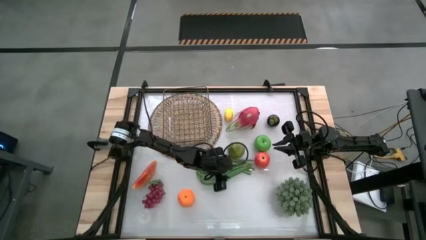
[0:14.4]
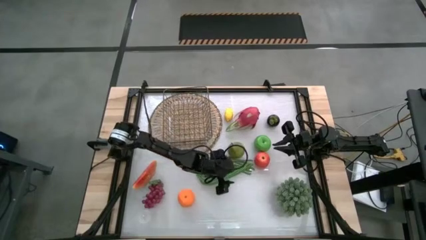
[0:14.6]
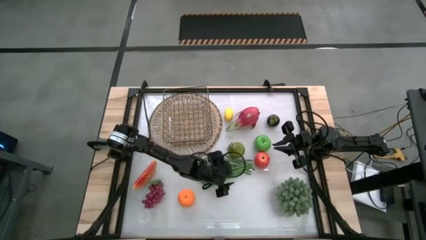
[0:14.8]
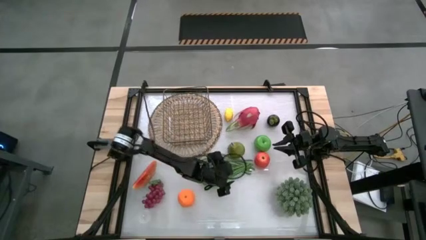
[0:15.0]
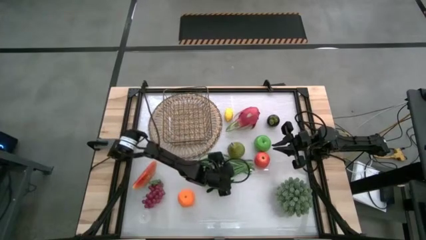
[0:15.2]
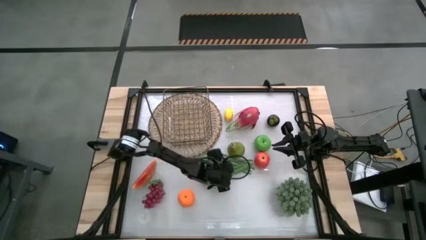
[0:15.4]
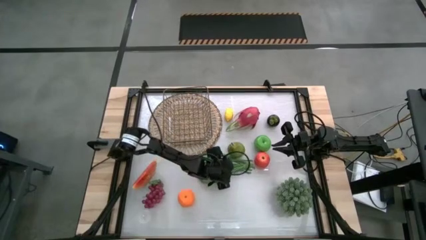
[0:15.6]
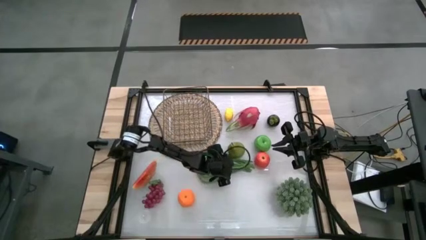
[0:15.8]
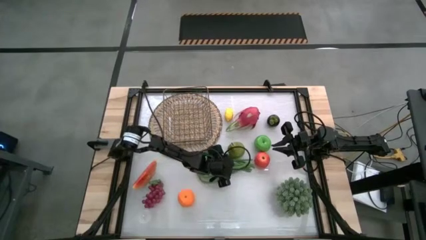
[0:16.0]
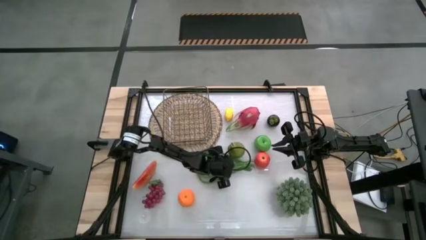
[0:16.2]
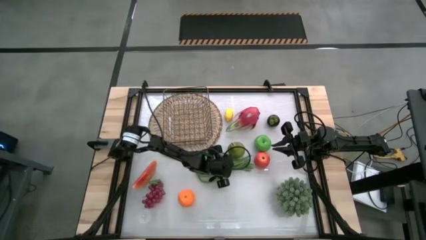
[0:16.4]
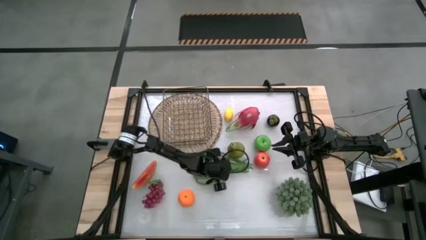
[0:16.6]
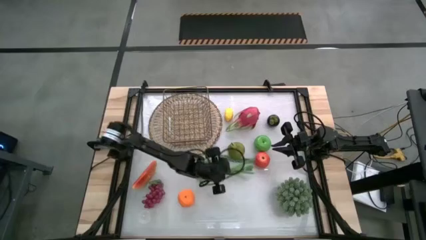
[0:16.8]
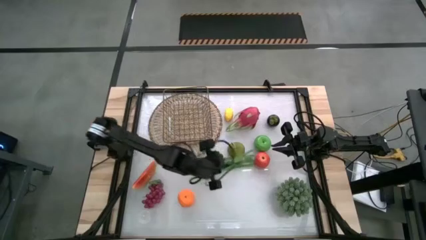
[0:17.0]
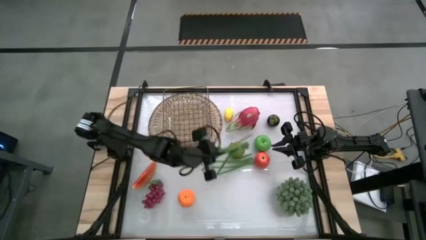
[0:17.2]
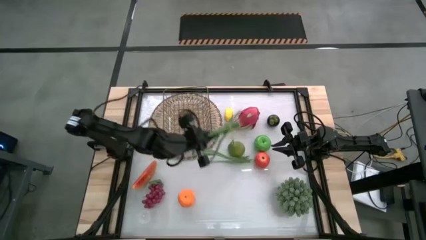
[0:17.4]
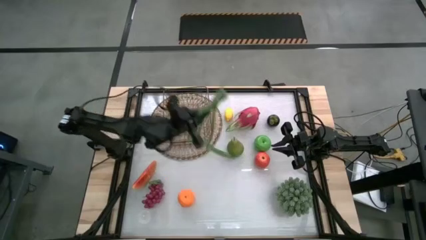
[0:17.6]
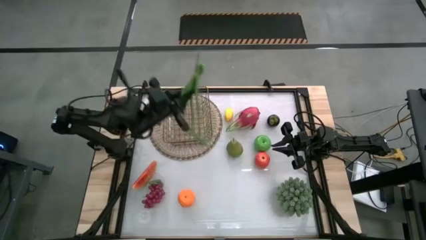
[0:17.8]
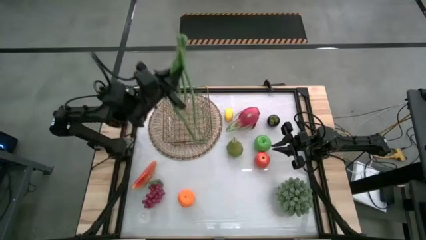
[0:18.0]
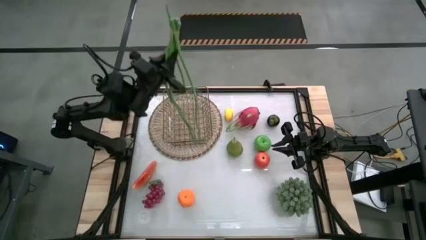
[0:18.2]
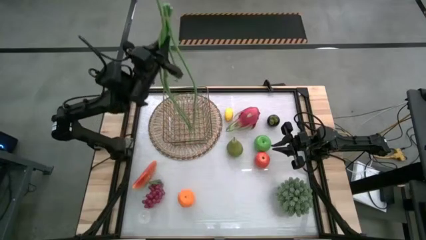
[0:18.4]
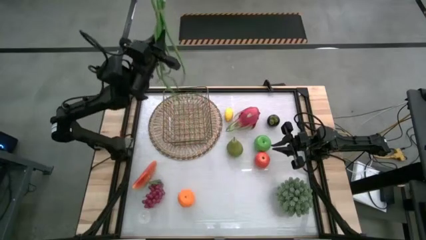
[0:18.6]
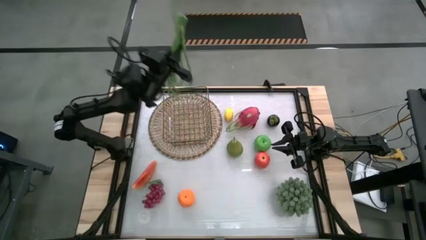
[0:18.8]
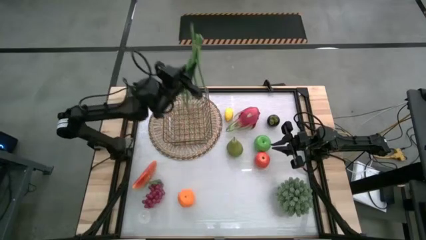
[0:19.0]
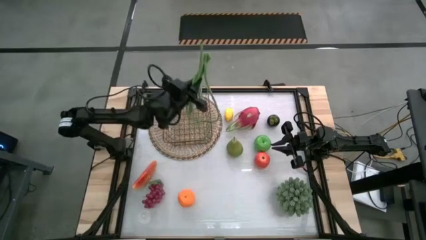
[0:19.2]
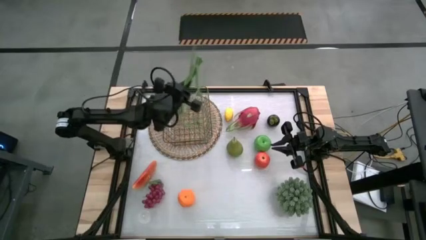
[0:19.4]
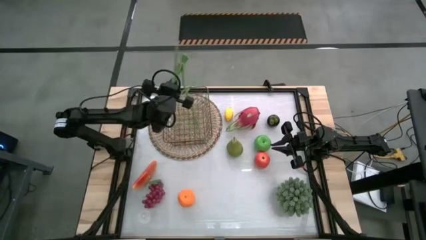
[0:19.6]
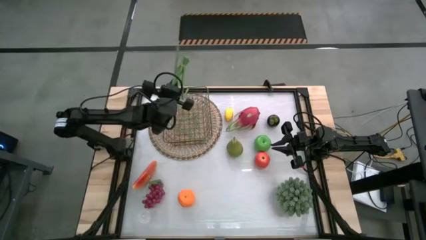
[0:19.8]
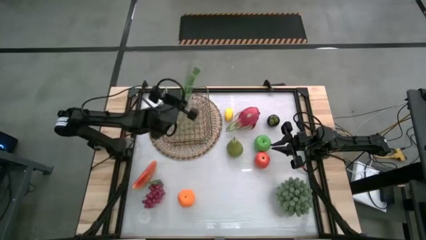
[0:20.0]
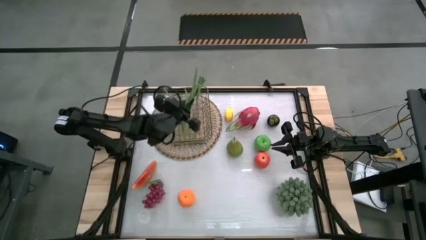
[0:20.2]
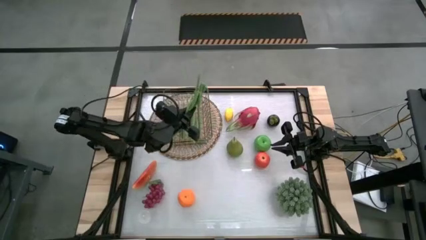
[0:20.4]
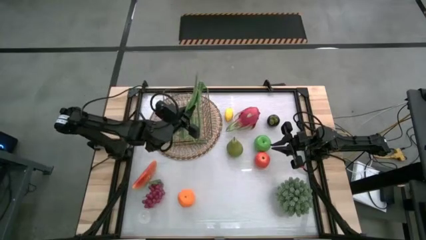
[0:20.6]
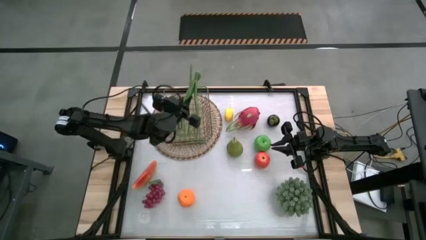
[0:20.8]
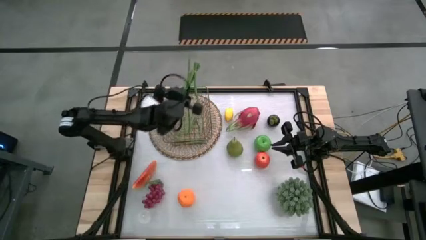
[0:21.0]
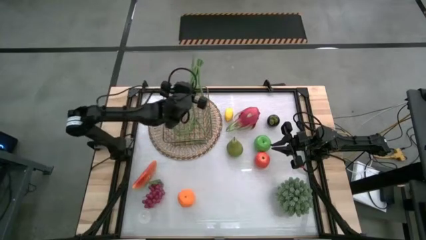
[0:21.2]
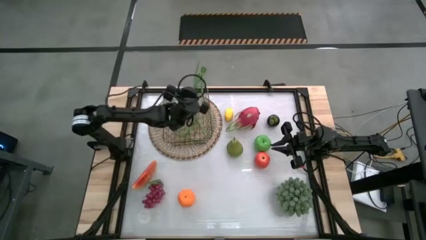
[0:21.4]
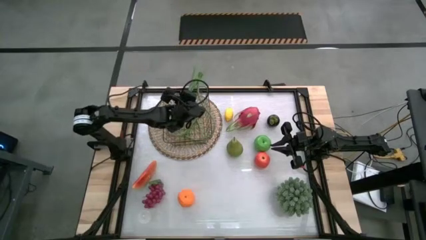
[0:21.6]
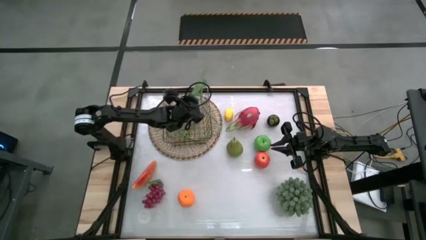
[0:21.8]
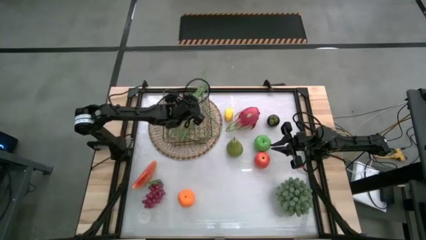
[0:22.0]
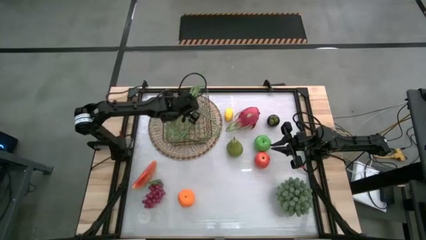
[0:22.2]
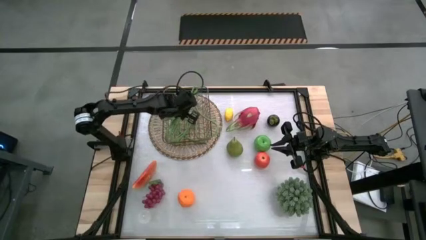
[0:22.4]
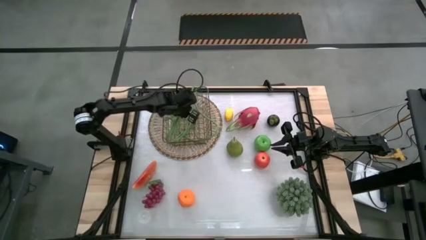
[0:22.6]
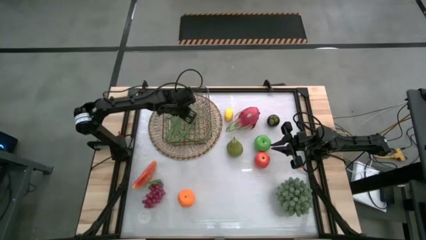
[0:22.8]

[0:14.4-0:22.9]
Task: Build produce basket
Put the green string beans into the wire basket

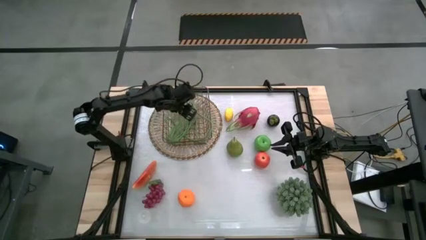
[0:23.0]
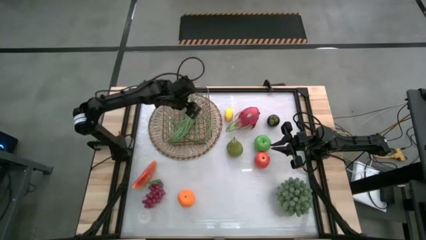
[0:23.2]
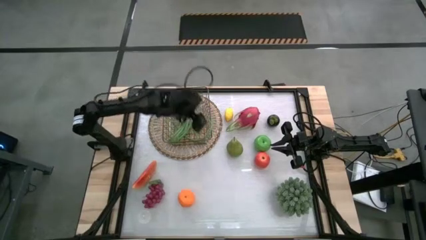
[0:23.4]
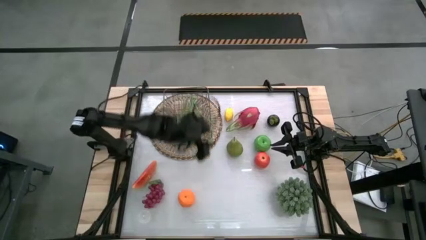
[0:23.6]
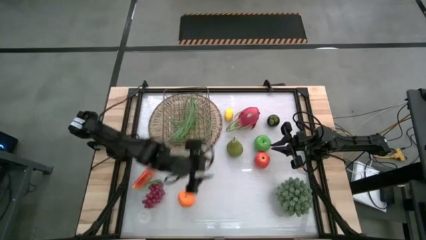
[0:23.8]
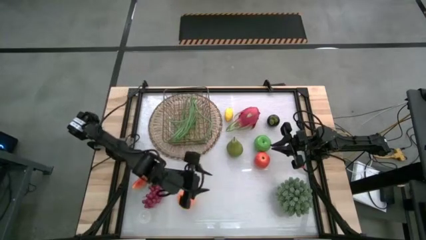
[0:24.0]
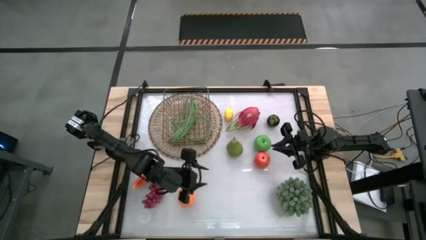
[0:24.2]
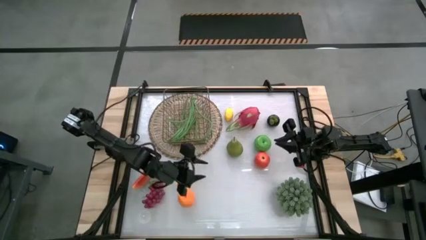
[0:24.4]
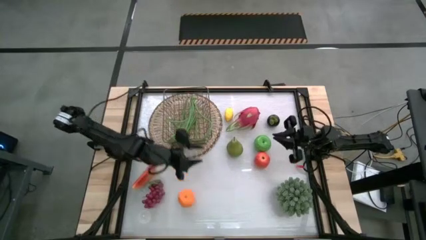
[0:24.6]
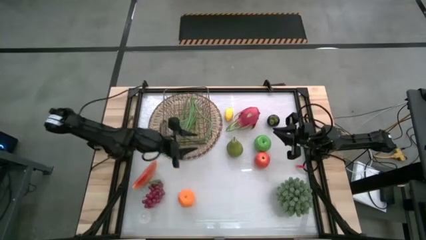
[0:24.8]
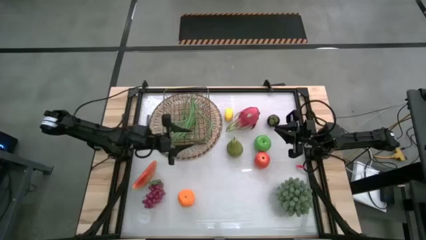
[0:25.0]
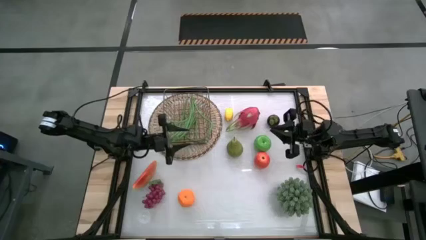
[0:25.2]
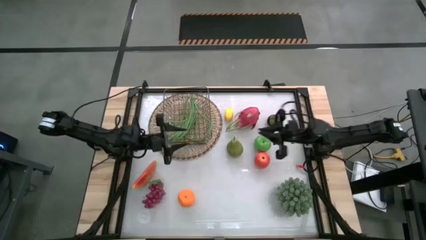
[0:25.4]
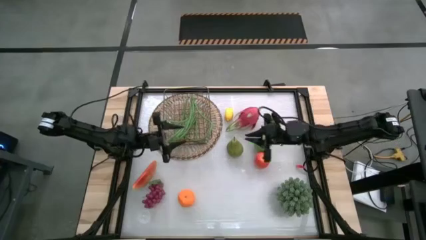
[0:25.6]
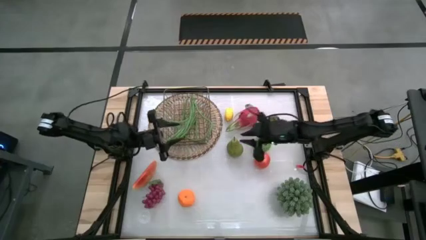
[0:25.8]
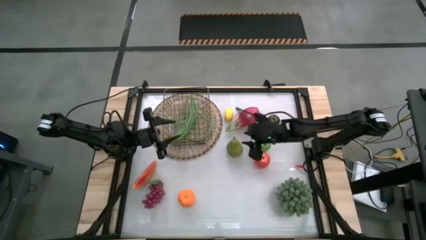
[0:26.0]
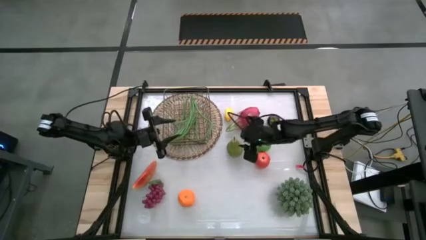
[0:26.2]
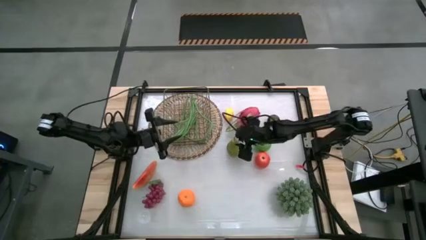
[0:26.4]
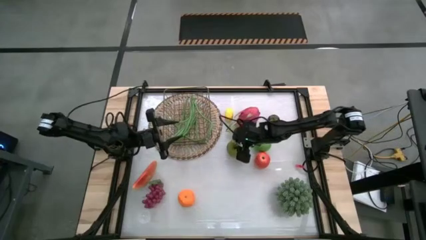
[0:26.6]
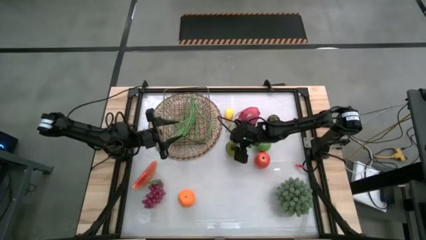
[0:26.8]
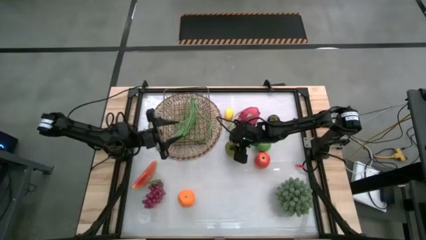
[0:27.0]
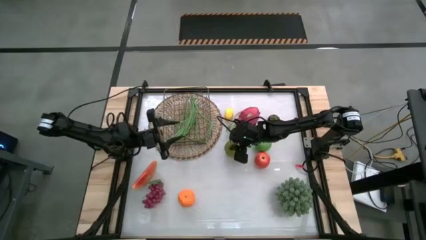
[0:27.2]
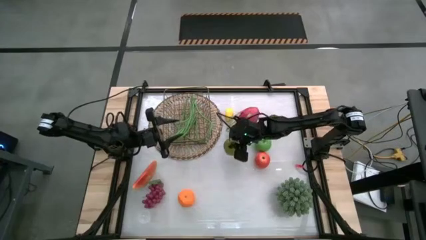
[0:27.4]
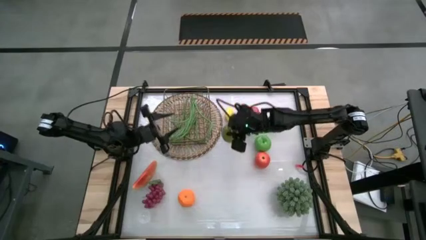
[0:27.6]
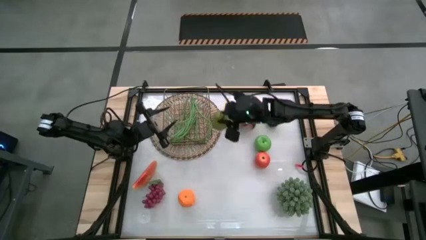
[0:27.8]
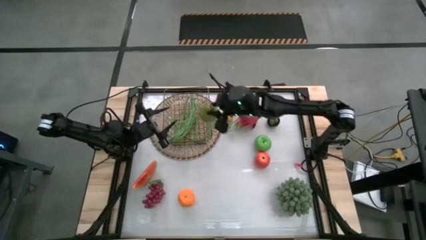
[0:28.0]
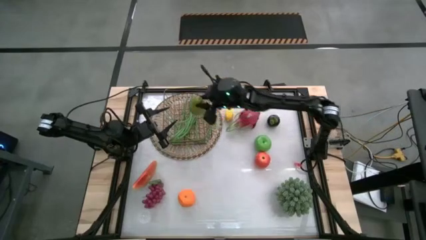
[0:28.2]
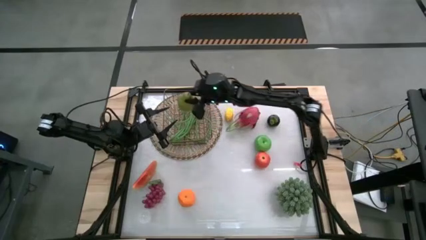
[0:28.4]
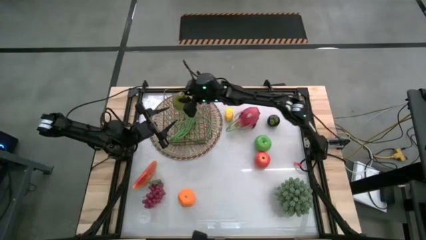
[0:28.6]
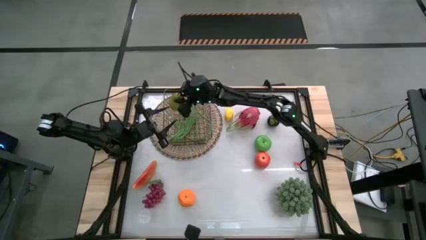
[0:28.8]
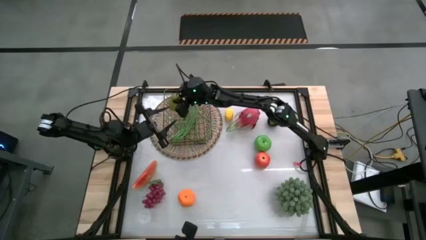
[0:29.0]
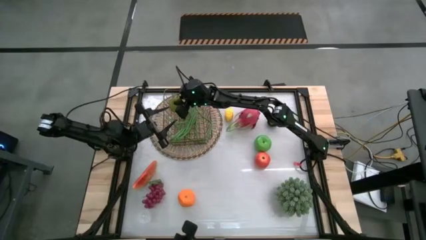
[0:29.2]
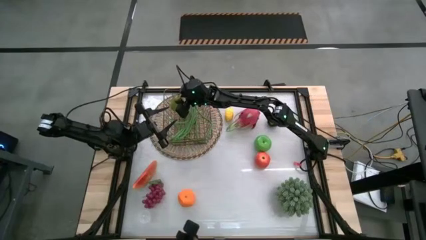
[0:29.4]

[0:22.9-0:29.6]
Put the green pear into the wire basket

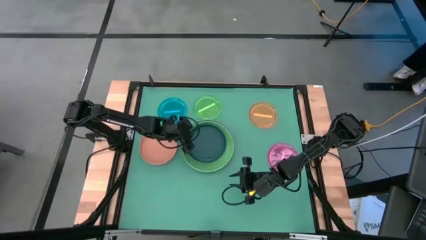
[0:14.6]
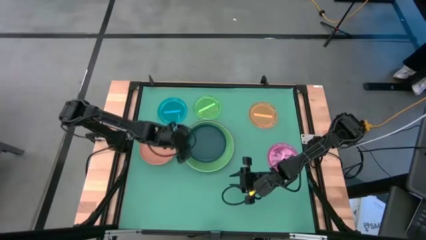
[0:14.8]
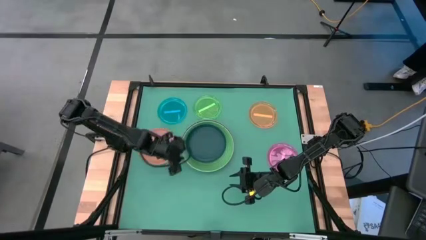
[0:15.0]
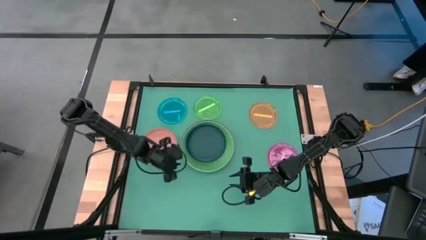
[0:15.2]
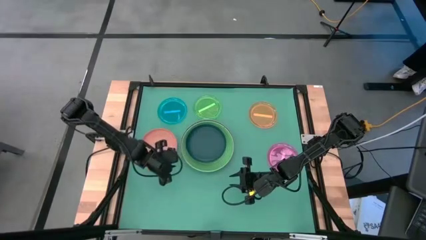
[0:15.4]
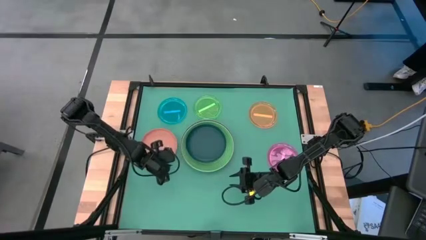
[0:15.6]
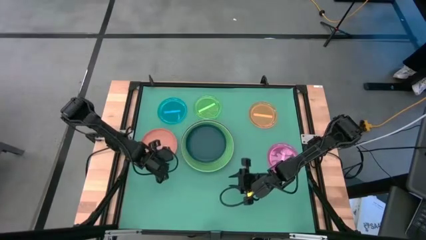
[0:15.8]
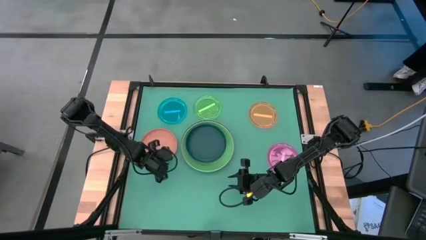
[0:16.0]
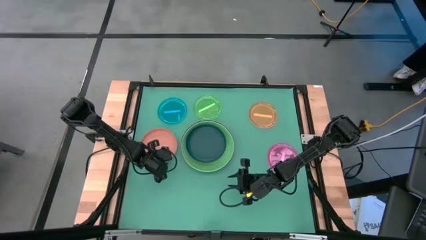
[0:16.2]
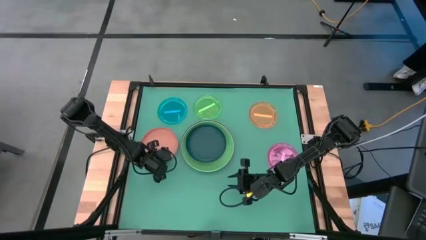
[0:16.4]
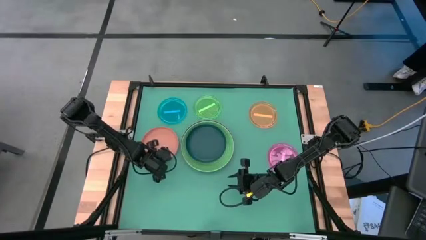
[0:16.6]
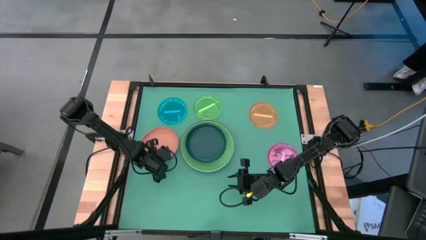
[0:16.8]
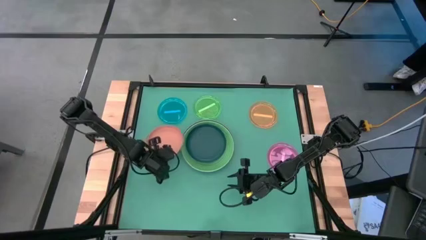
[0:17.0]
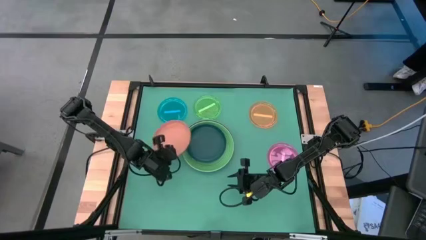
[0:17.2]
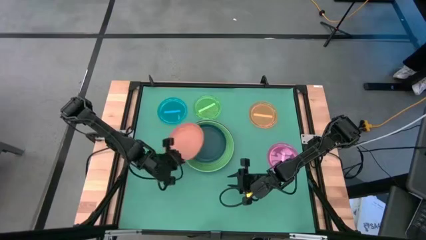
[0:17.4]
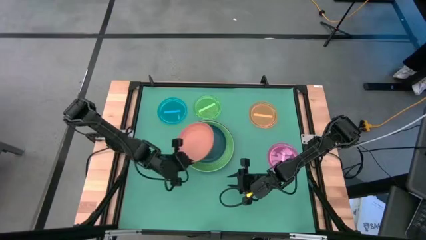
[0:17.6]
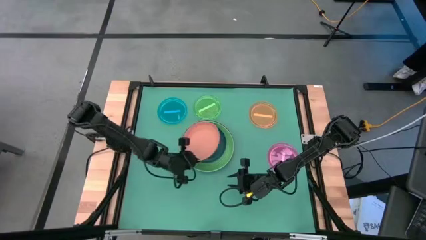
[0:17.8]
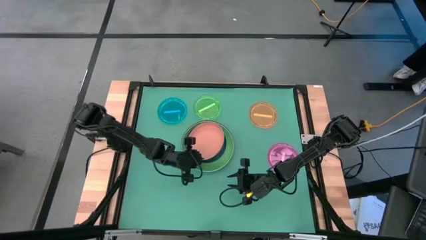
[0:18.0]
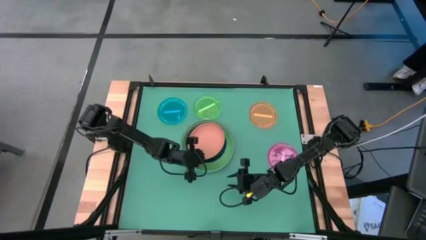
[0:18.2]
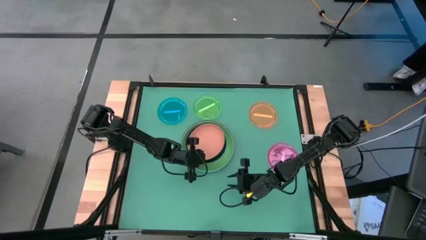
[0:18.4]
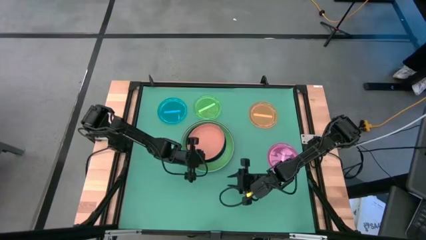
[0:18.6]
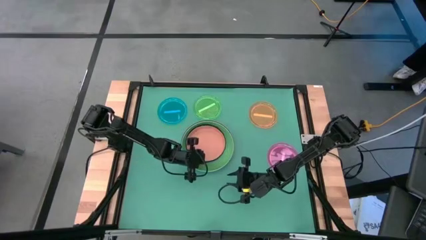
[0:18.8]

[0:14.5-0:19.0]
Task: Stack plastic plates
Stack the orange plate on top of the dark green plate
